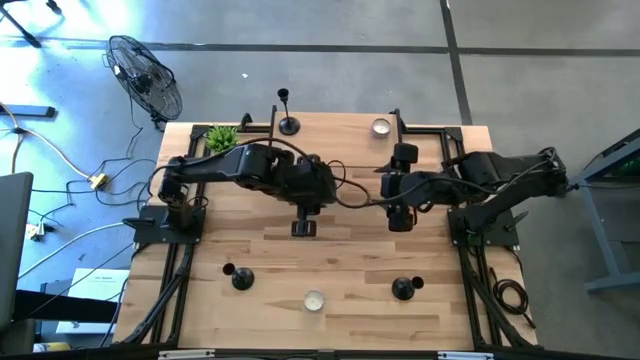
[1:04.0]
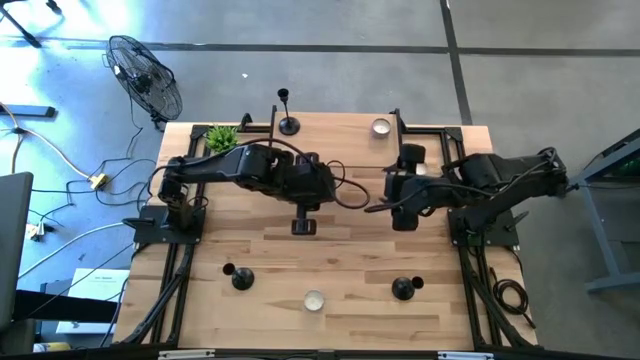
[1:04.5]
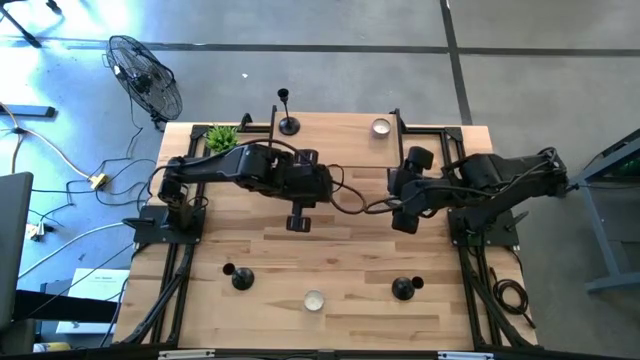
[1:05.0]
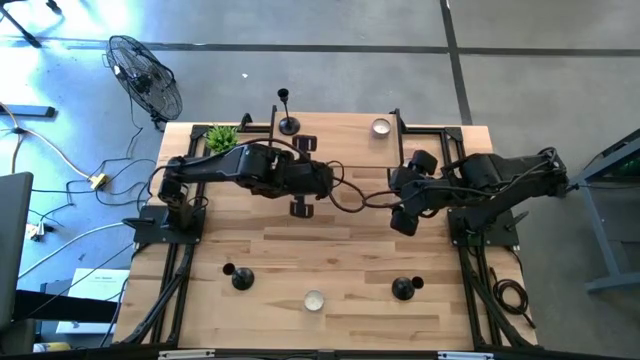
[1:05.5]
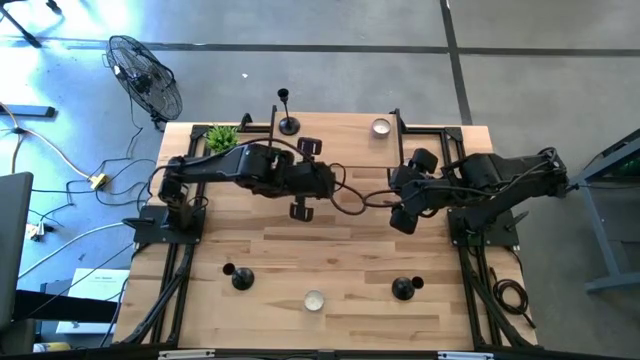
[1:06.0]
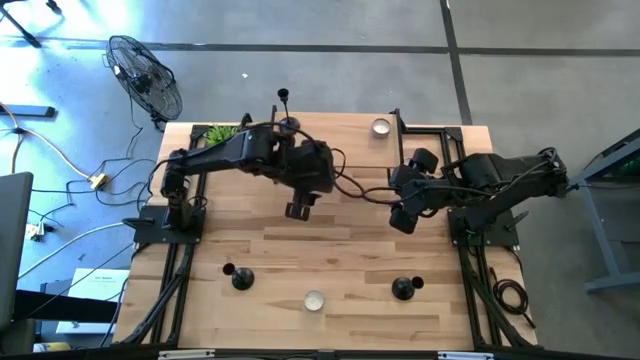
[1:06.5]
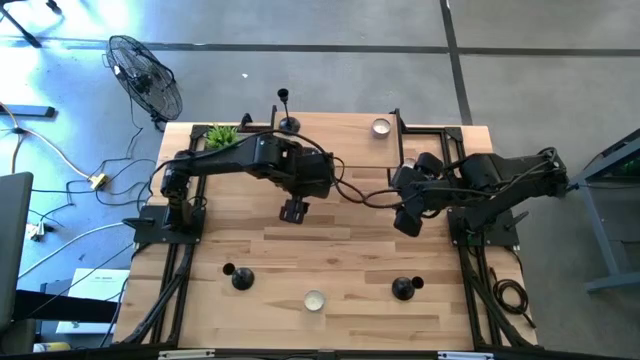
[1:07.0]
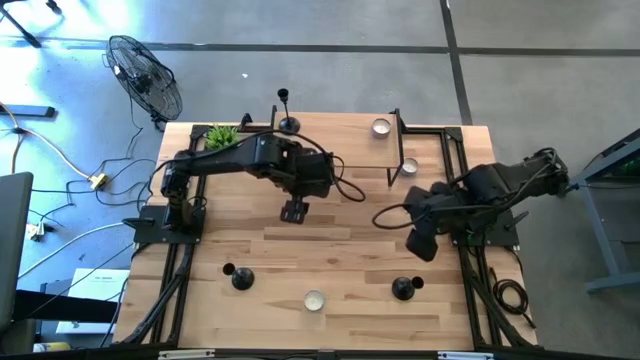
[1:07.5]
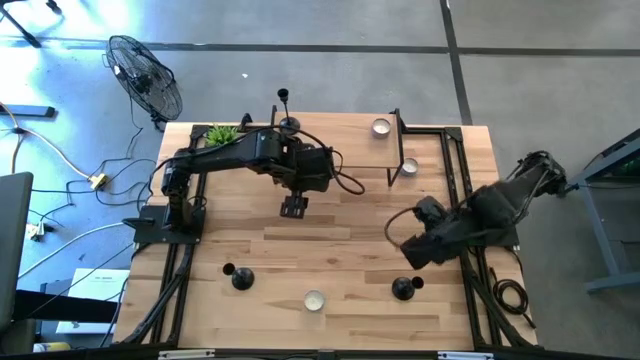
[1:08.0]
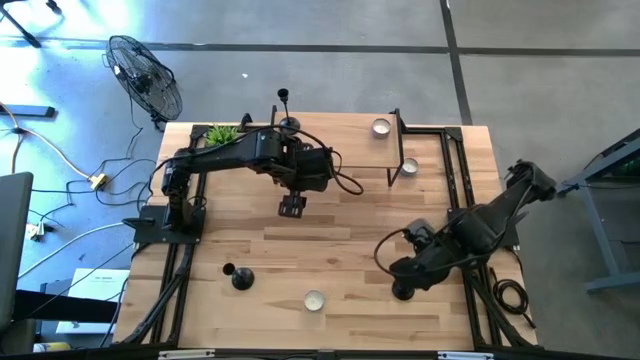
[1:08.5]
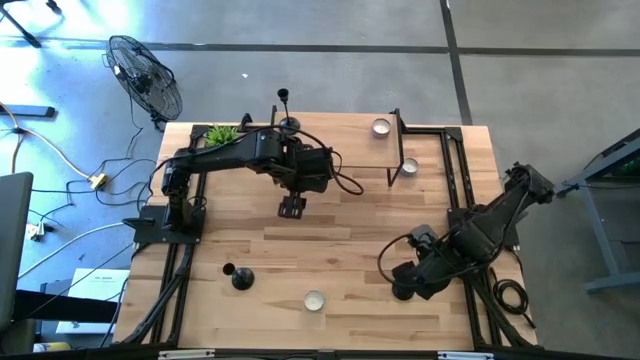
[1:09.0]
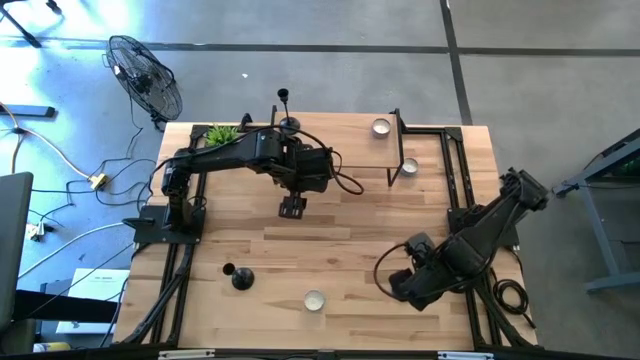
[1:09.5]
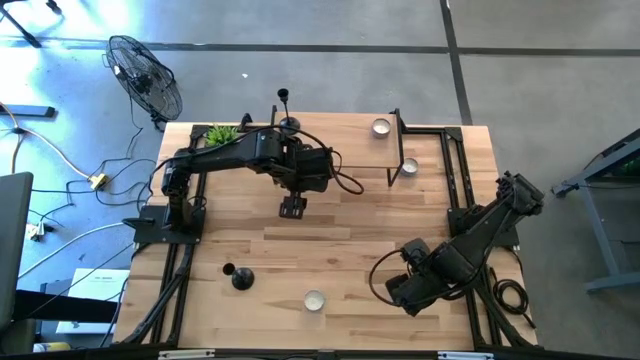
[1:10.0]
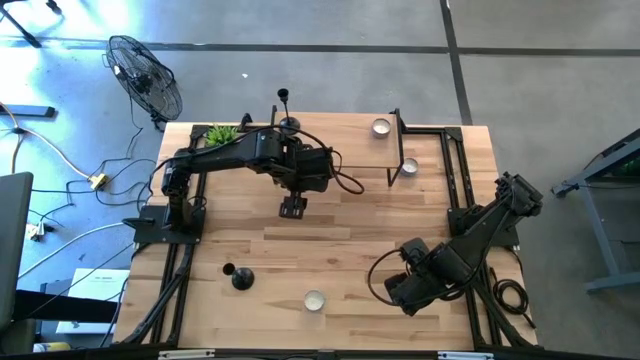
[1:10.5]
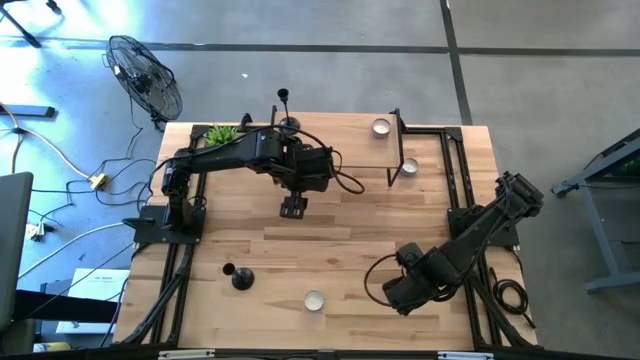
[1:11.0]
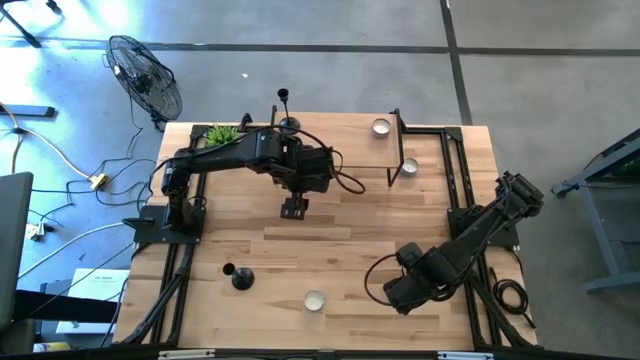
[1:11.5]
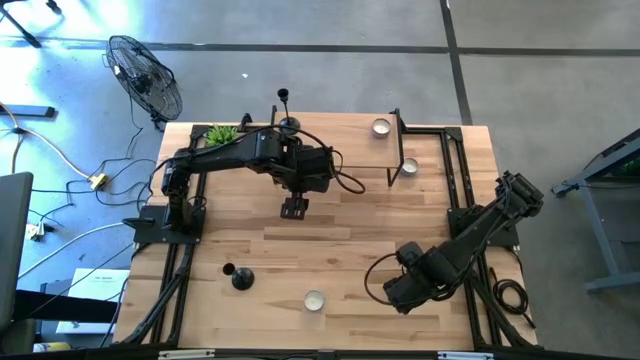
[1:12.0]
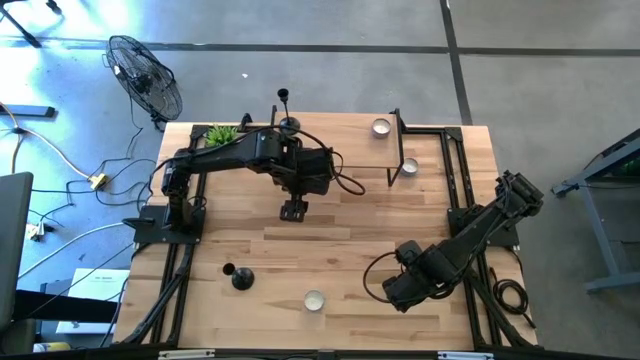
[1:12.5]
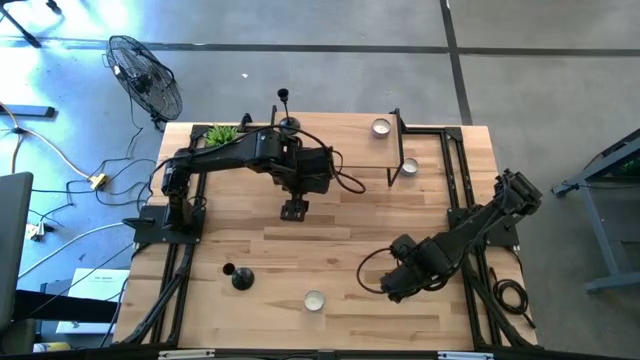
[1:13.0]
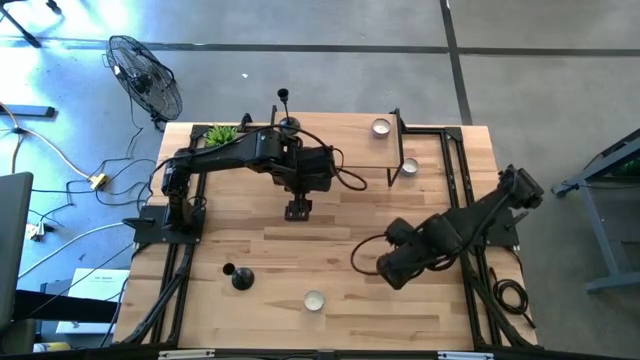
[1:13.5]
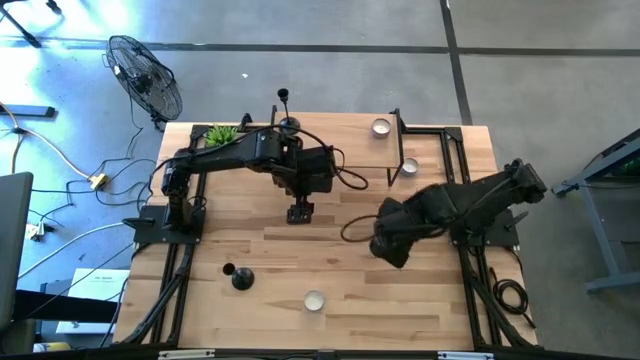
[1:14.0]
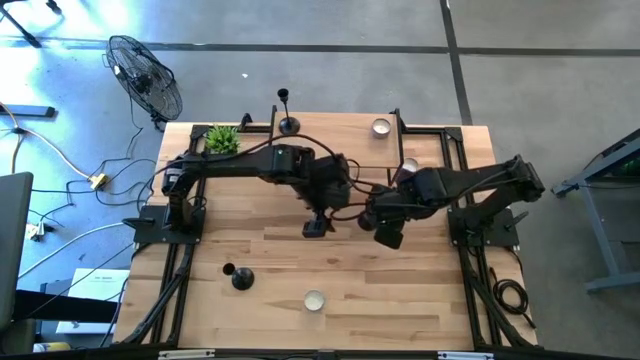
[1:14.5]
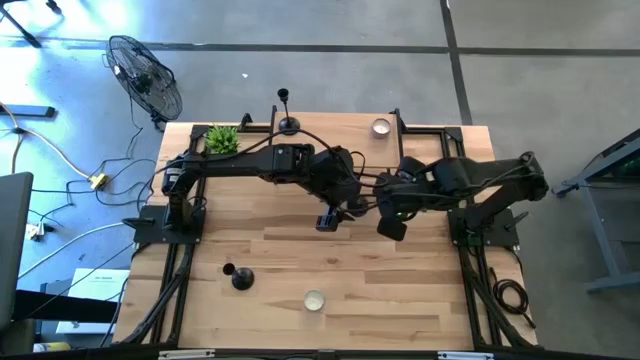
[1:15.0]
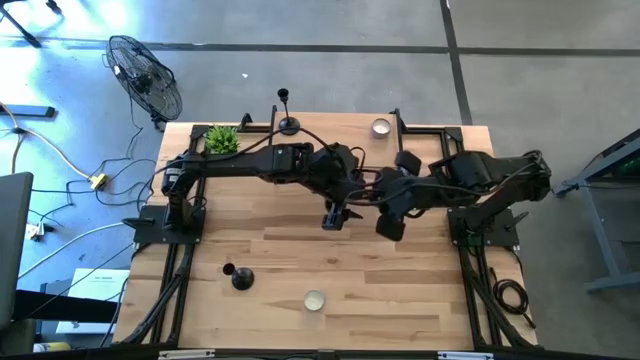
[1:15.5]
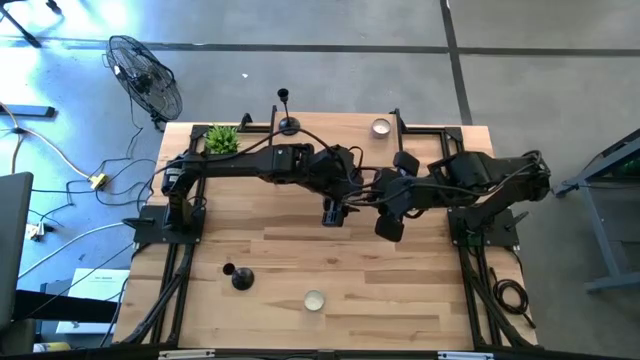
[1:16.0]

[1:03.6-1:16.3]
Task: Pick & Place candle stick holders
Put the right candle holder on the shelf

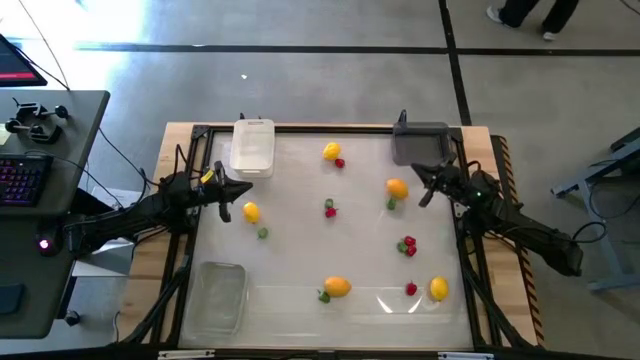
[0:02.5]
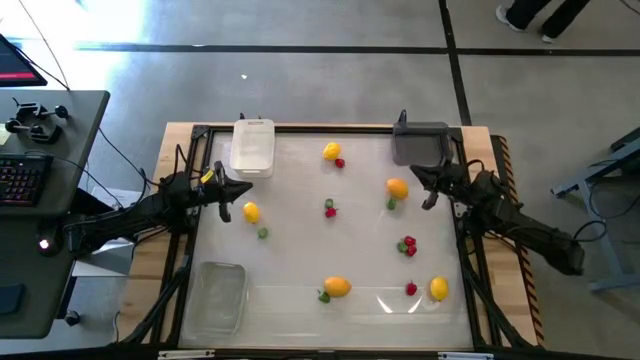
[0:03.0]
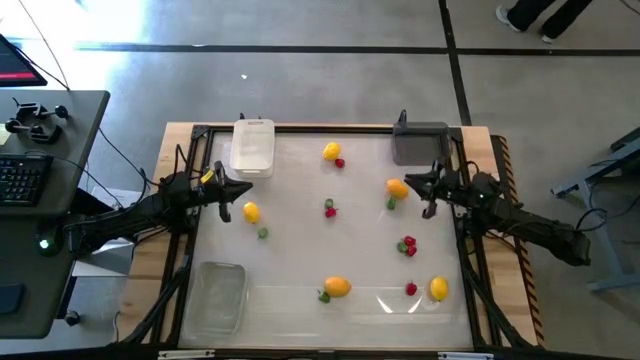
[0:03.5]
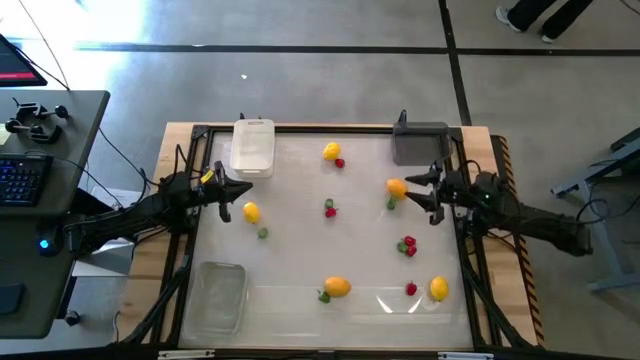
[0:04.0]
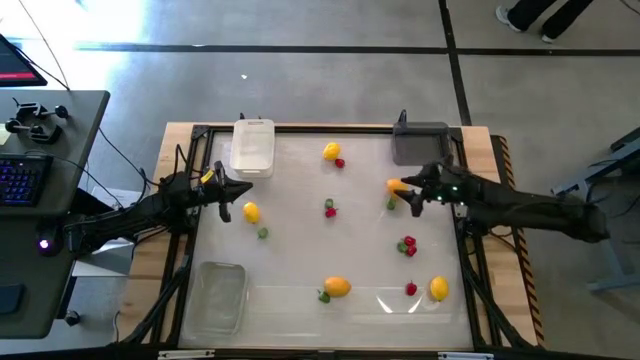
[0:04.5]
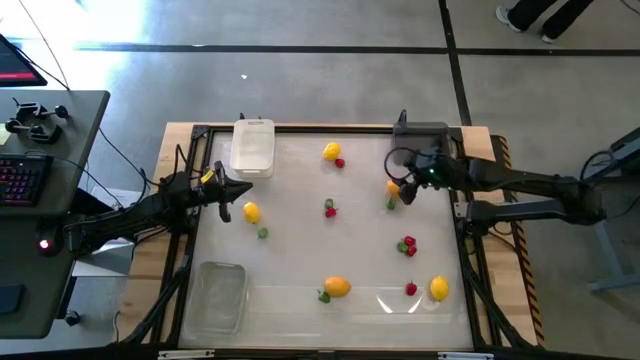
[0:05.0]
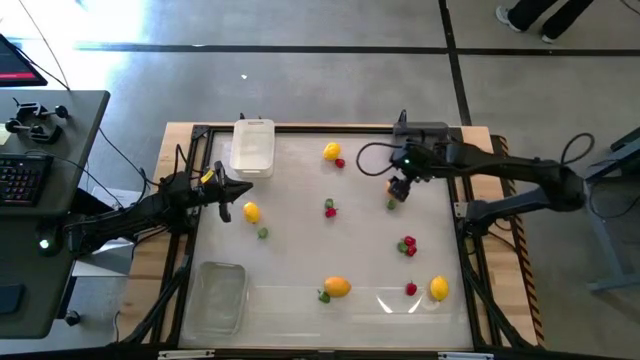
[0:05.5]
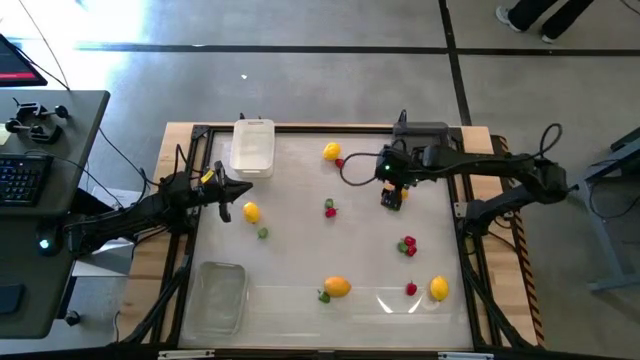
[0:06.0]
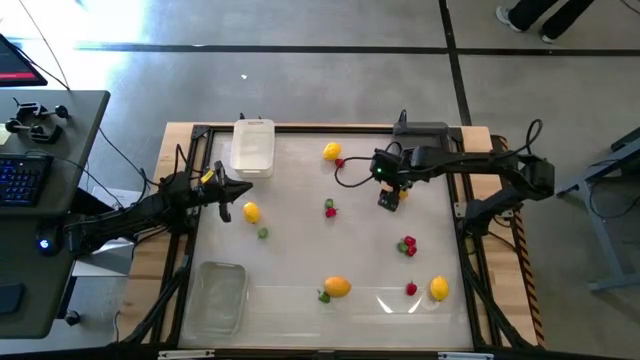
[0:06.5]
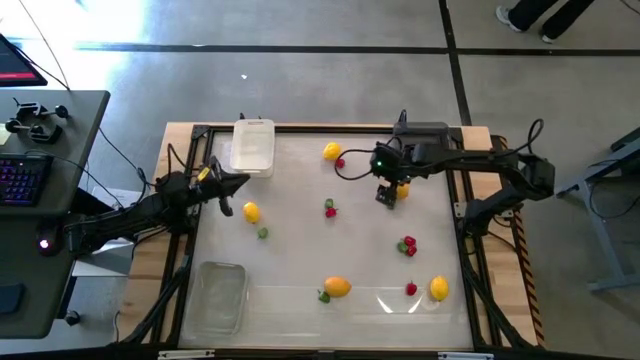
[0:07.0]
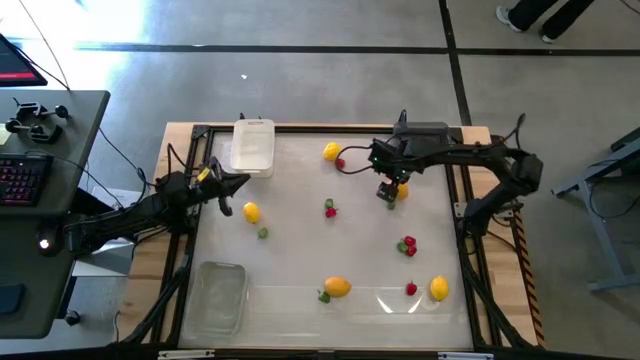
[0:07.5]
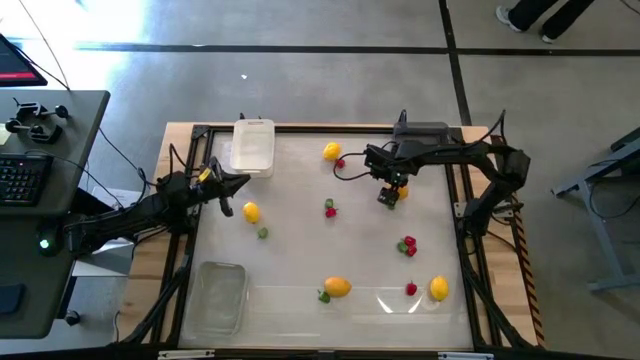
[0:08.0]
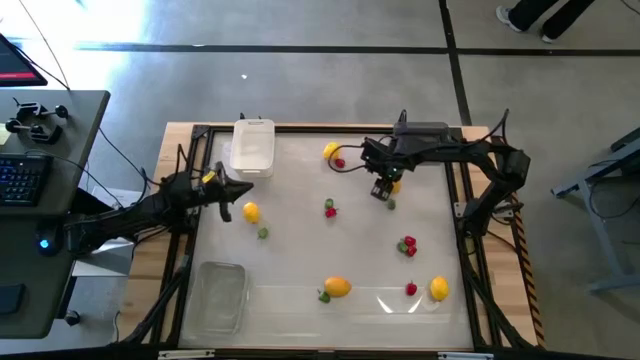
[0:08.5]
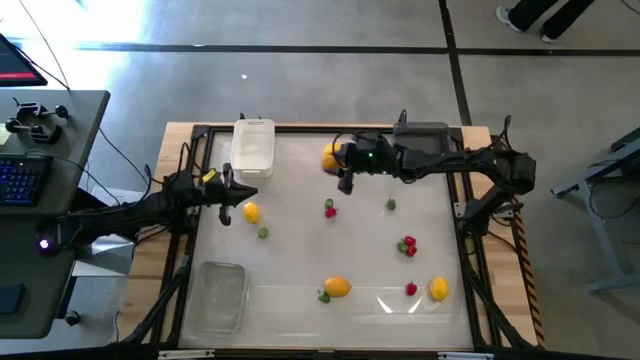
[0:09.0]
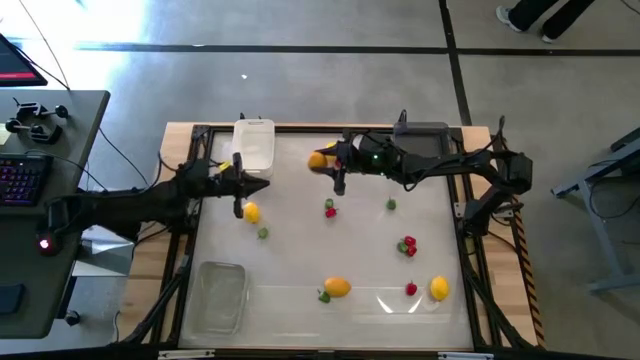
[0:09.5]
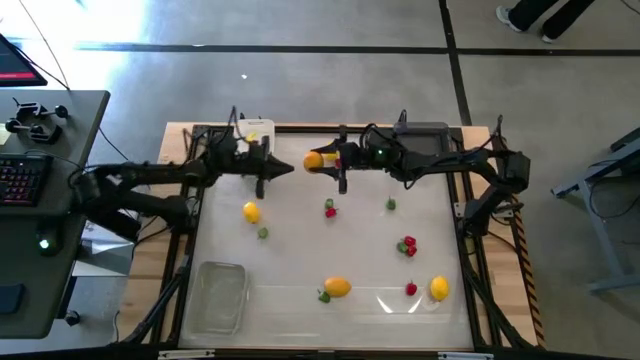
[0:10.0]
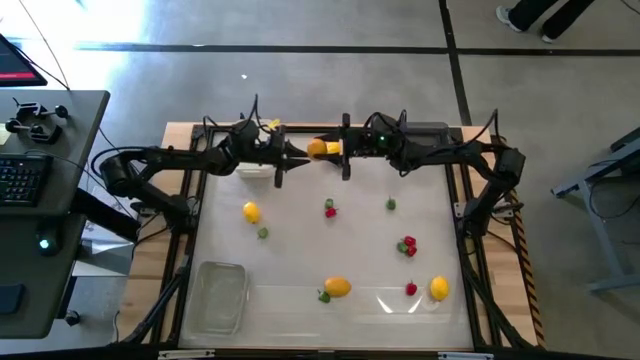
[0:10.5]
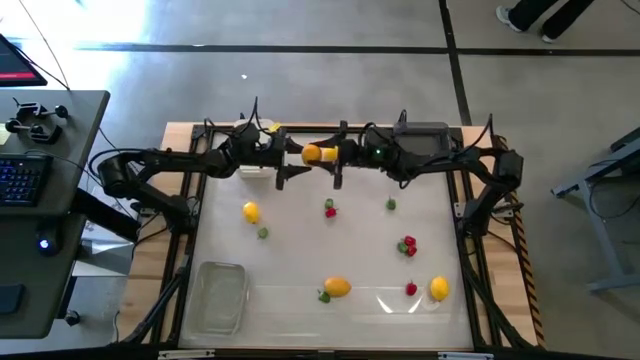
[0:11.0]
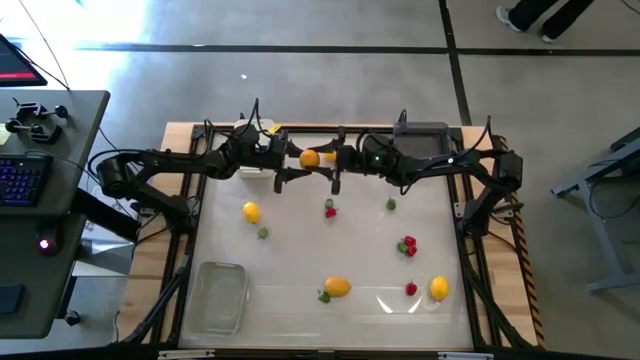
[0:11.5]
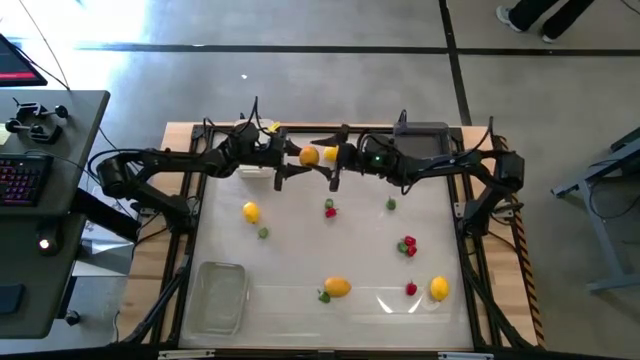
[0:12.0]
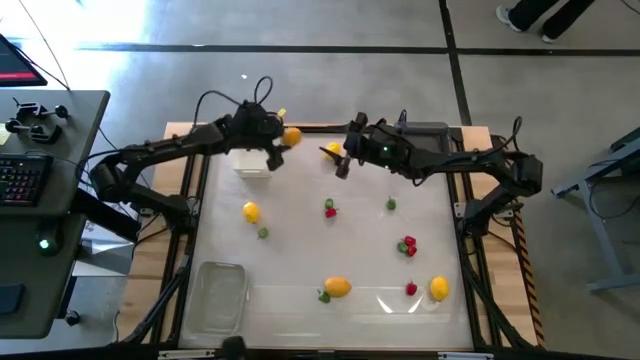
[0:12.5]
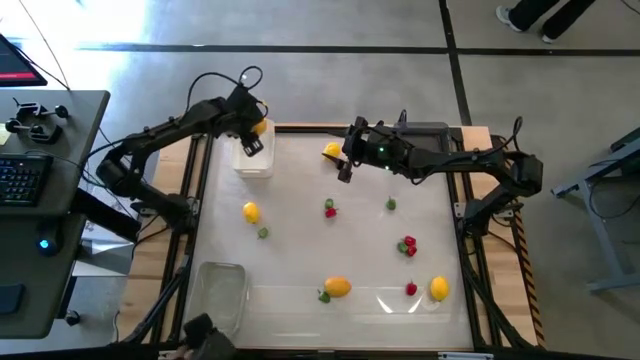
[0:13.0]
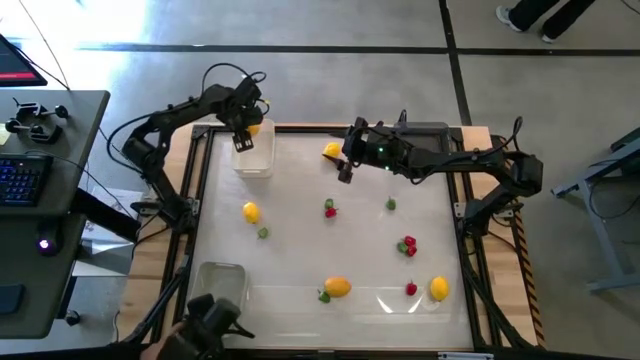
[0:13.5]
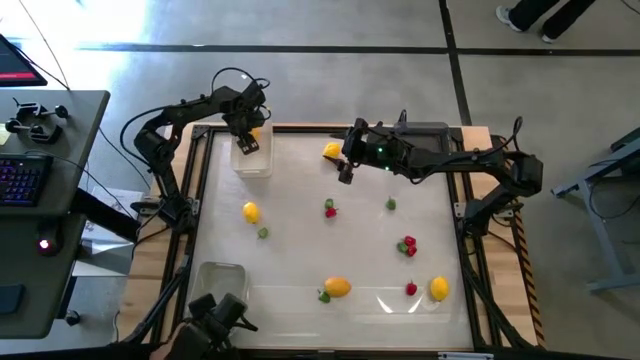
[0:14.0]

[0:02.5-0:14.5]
Task: Sort produce into baskets
Put the lemon into the white bin
